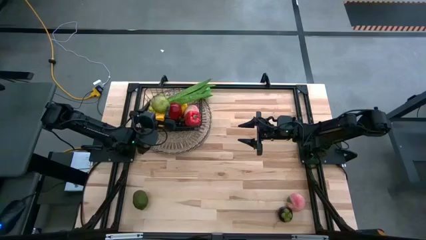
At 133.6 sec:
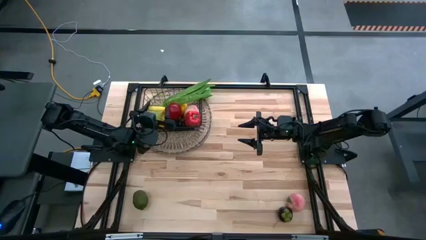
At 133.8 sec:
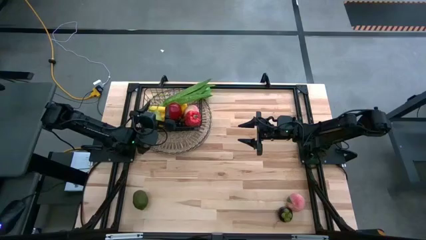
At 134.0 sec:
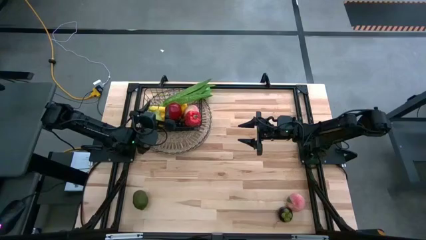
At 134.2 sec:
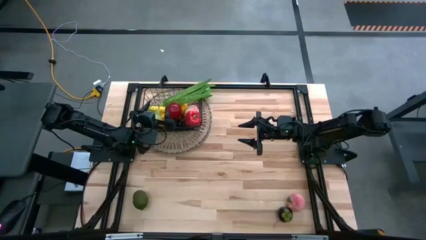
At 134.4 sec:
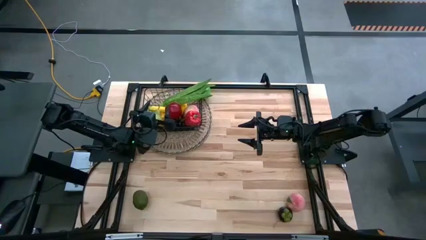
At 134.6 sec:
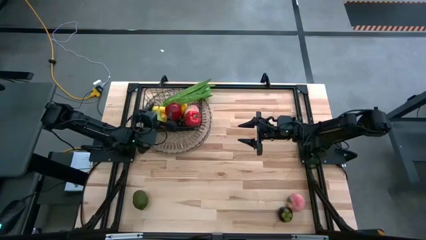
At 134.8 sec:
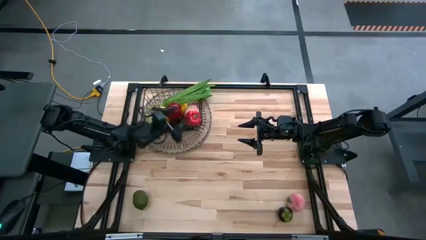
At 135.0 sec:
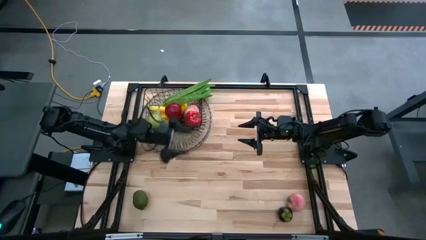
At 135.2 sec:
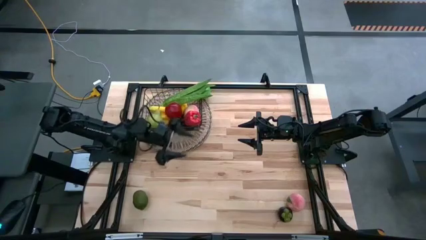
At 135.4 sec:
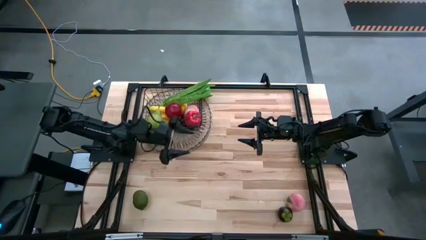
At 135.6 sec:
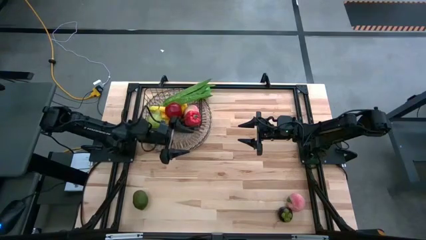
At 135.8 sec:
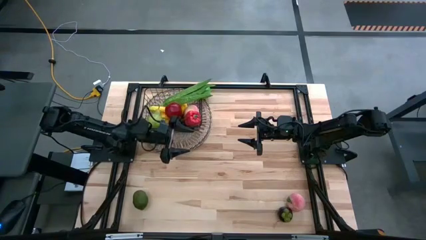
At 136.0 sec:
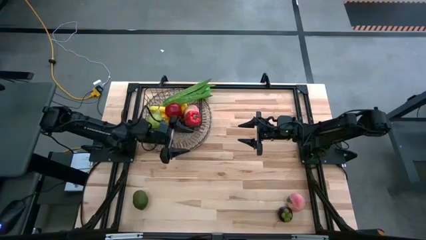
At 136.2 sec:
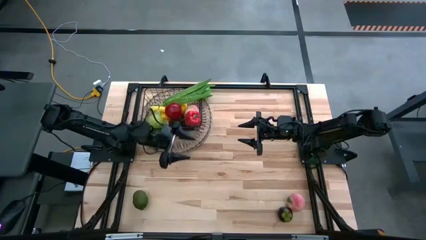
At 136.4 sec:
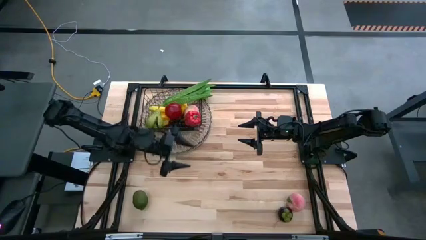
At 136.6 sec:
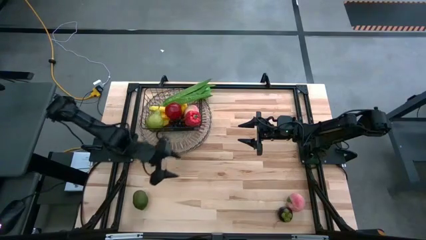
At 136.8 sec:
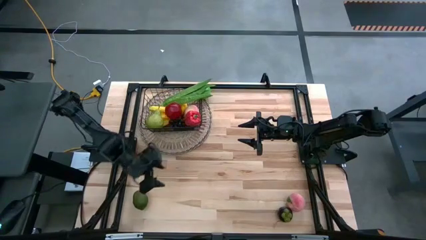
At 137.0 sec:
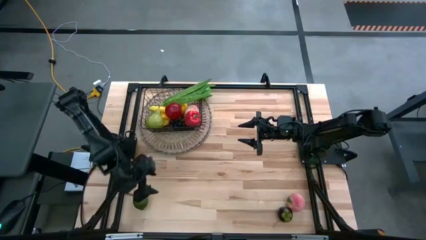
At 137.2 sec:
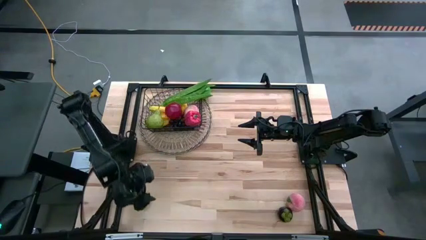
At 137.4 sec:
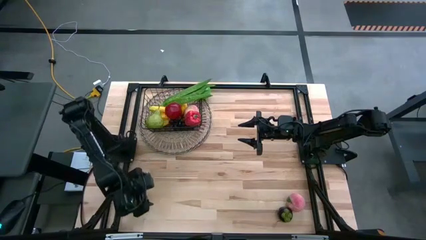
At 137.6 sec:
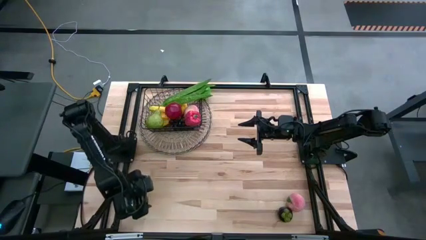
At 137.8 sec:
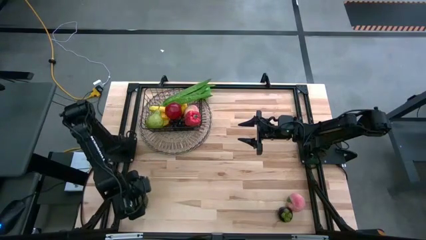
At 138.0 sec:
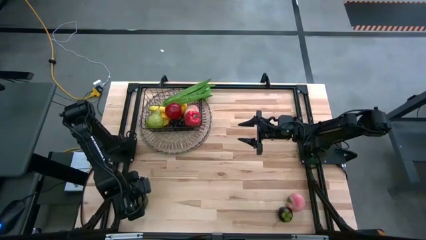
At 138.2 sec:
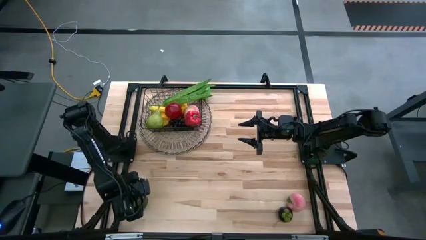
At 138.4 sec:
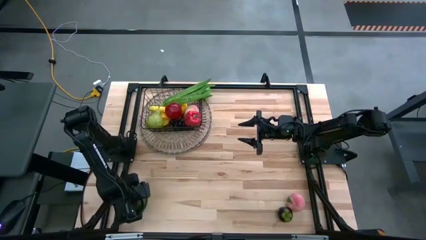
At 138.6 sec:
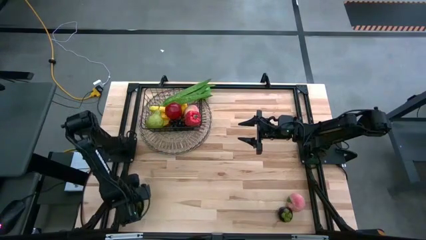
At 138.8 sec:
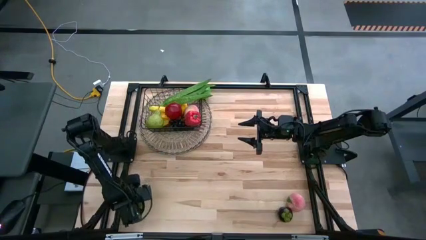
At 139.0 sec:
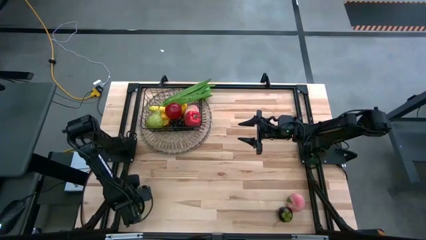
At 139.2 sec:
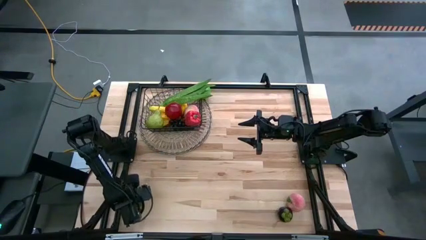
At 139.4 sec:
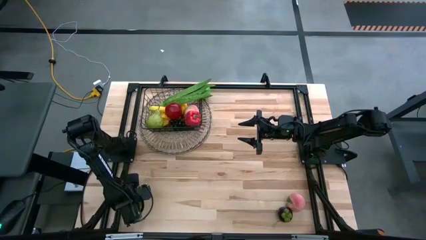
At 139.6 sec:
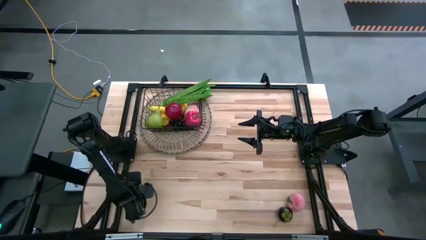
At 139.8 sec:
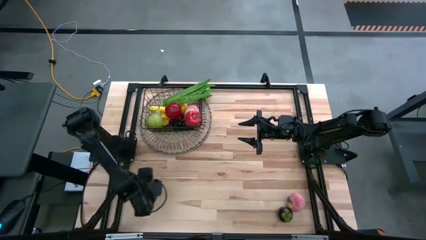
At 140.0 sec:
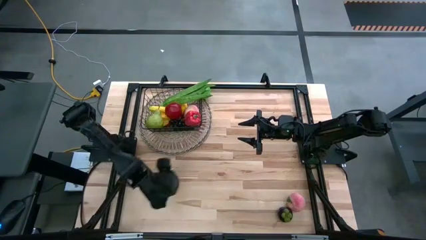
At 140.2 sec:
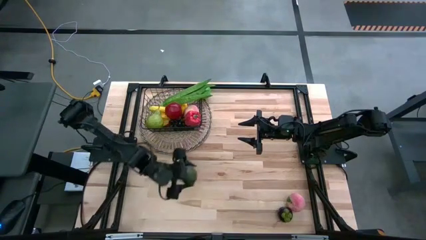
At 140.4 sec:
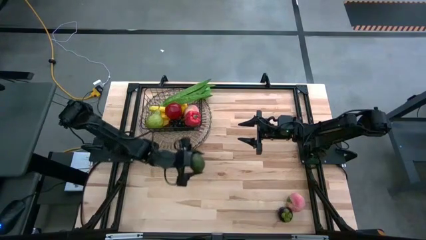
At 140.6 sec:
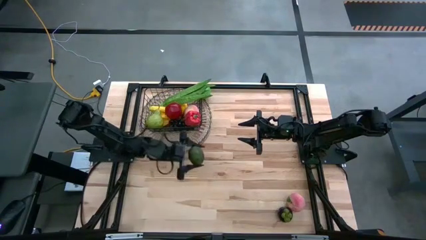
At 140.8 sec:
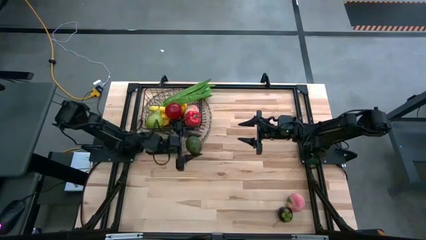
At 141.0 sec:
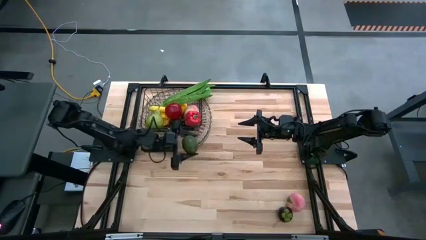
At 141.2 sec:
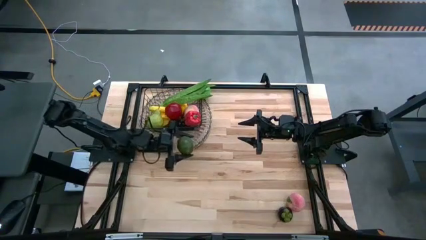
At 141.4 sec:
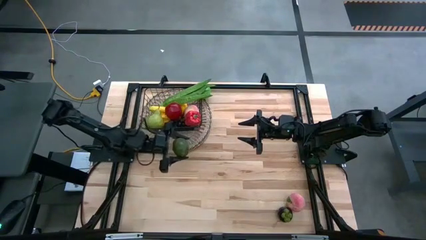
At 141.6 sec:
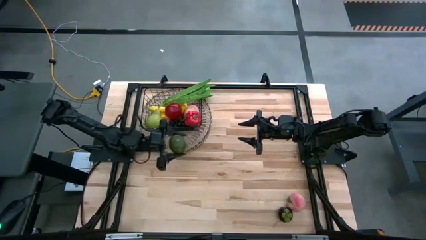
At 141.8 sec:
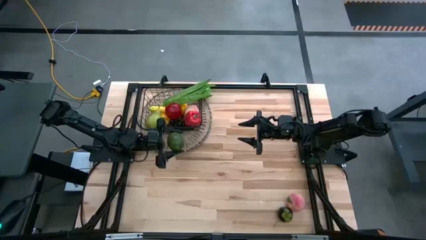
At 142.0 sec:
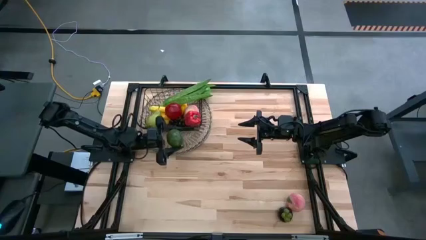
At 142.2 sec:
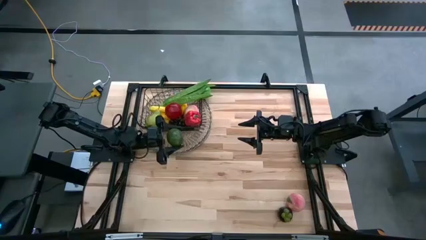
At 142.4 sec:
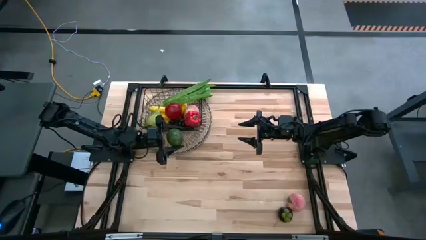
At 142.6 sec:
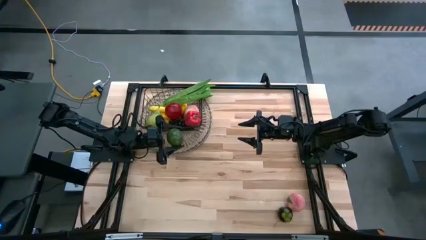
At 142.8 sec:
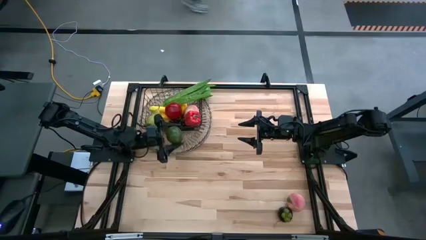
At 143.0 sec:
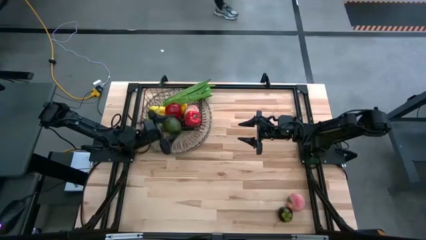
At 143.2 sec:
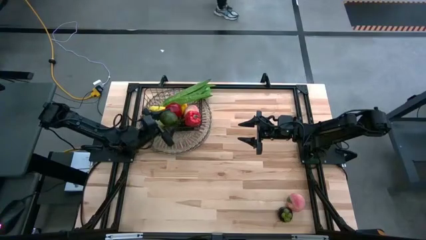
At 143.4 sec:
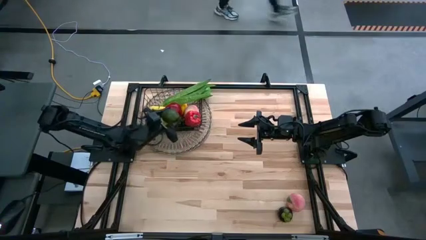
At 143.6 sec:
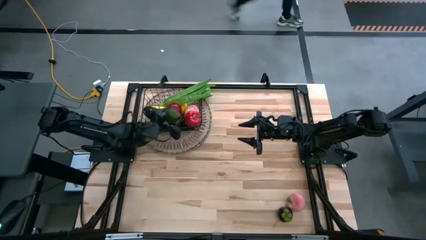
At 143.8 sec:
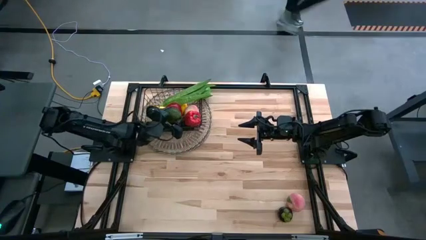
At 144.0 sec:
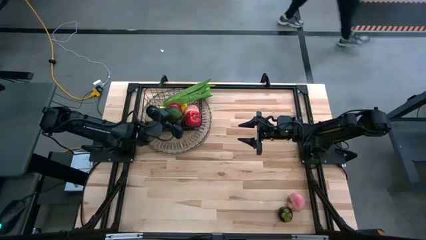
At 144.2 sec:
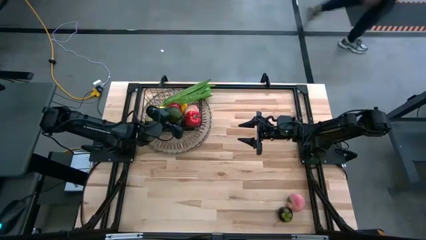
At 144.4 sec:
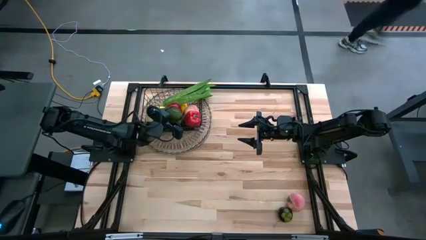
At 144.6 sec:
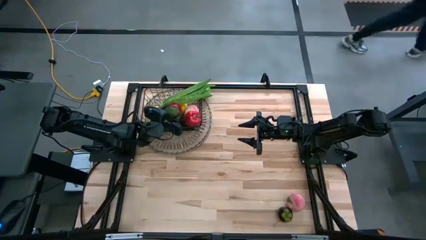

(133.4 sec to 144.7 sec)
Task: Build produce basket
Put the green lime into the wire basket
